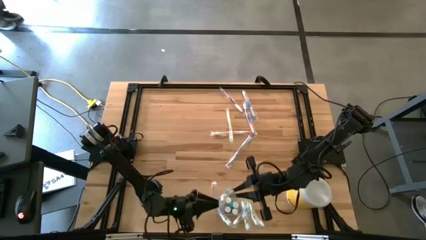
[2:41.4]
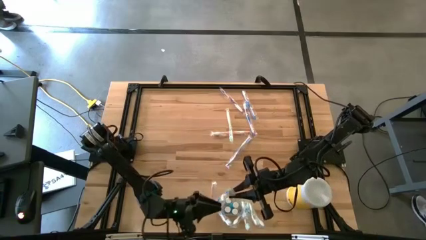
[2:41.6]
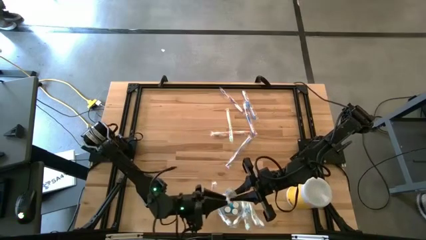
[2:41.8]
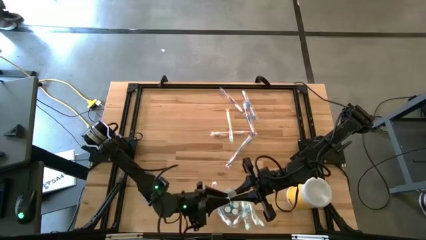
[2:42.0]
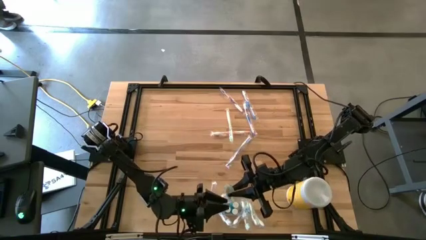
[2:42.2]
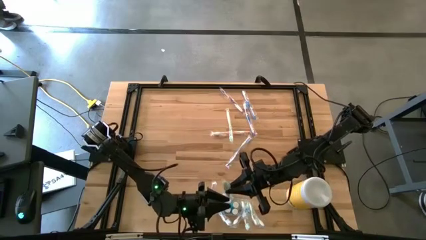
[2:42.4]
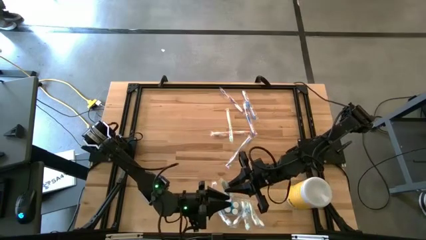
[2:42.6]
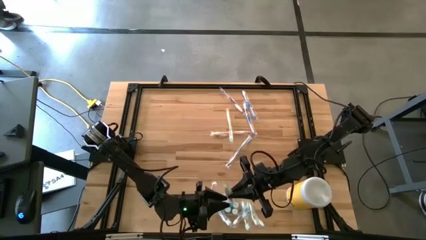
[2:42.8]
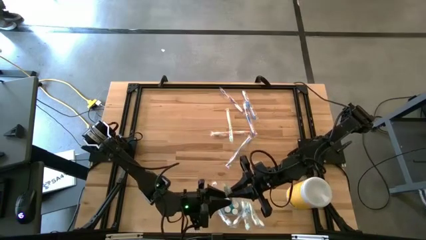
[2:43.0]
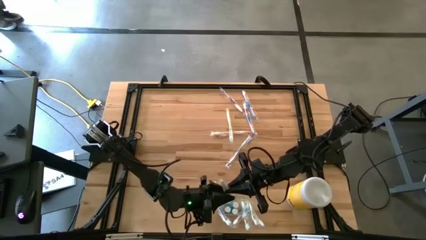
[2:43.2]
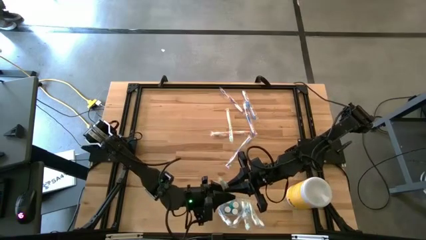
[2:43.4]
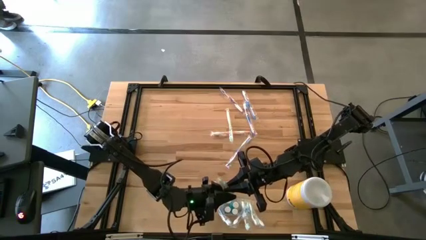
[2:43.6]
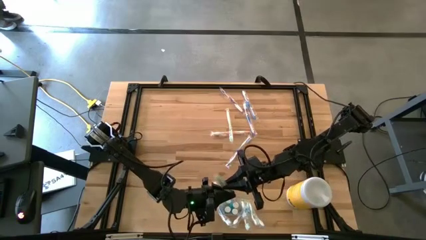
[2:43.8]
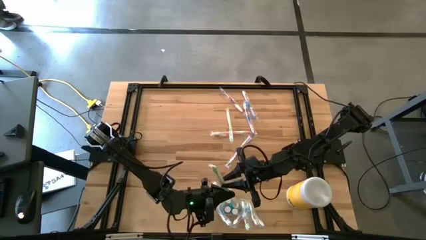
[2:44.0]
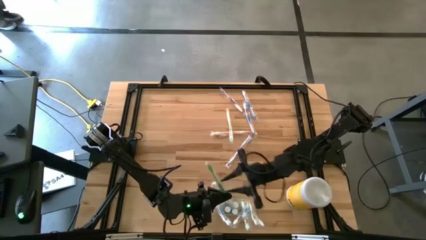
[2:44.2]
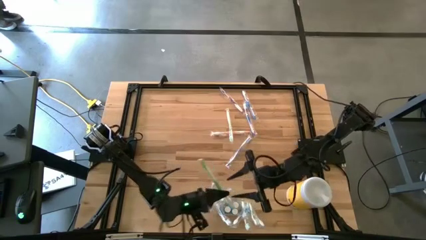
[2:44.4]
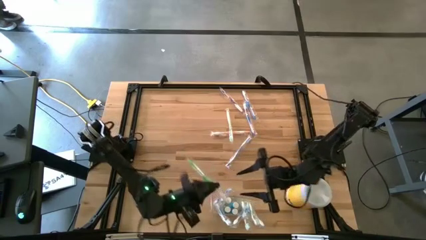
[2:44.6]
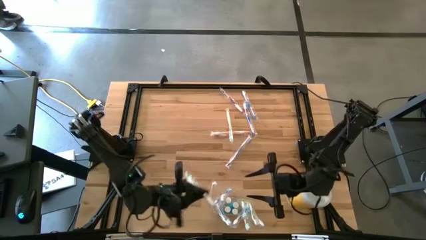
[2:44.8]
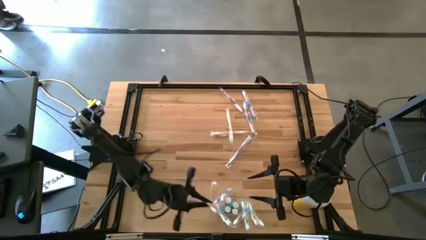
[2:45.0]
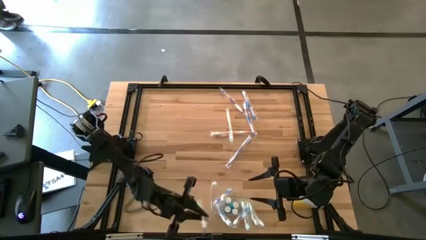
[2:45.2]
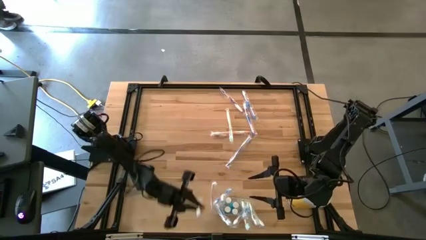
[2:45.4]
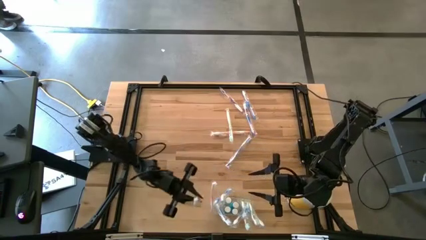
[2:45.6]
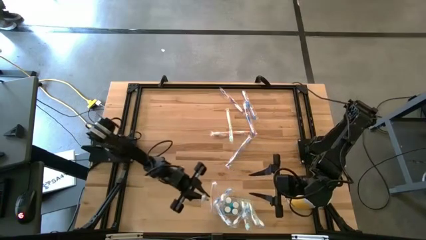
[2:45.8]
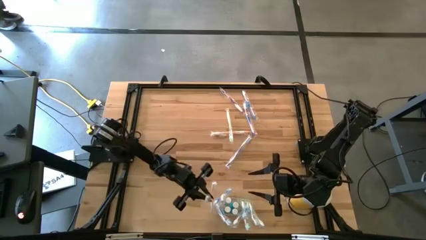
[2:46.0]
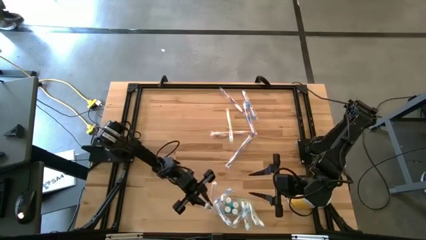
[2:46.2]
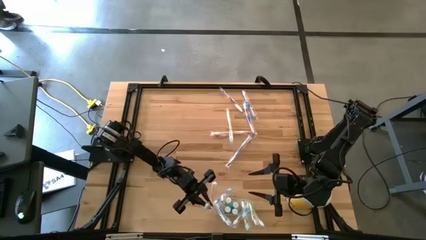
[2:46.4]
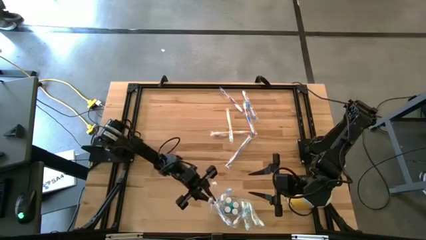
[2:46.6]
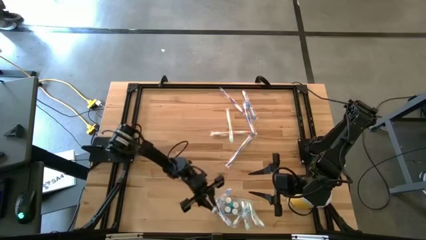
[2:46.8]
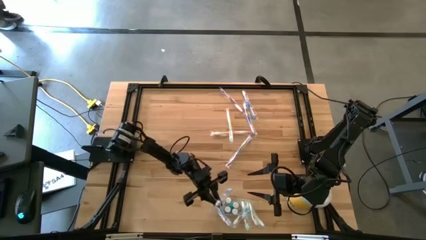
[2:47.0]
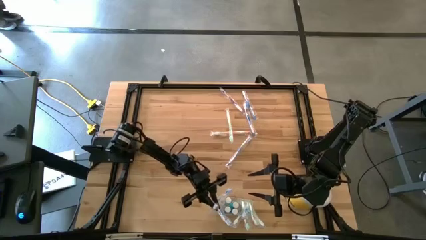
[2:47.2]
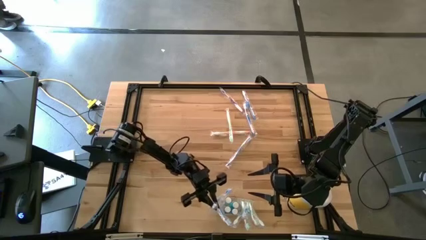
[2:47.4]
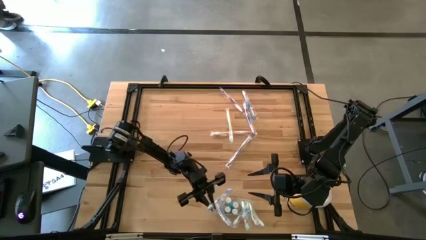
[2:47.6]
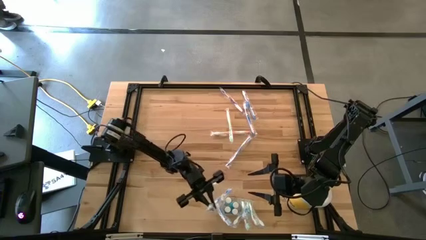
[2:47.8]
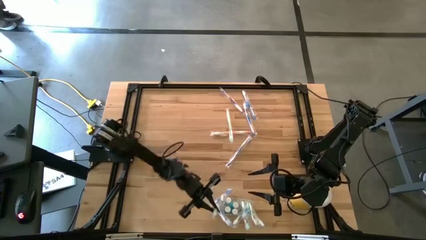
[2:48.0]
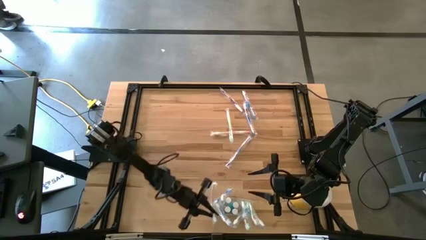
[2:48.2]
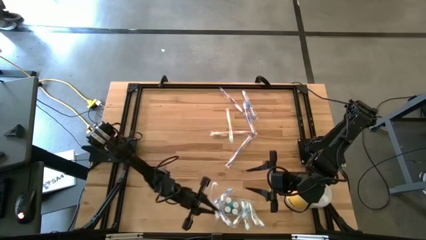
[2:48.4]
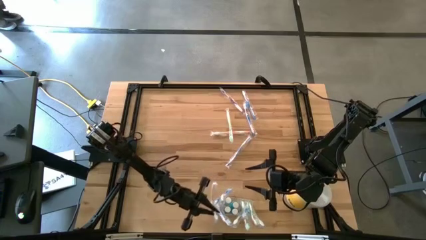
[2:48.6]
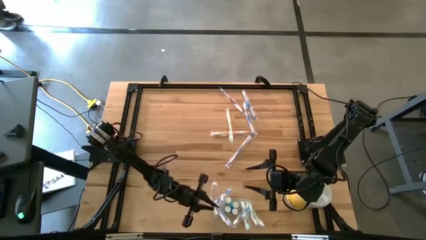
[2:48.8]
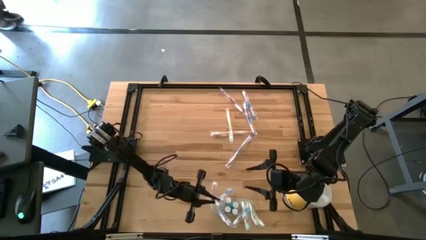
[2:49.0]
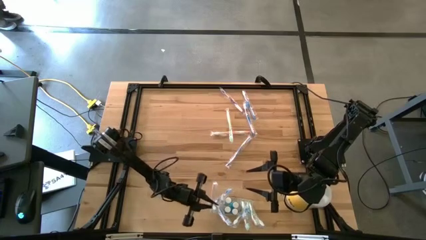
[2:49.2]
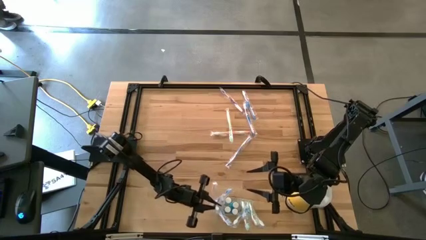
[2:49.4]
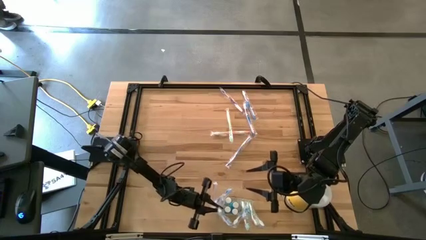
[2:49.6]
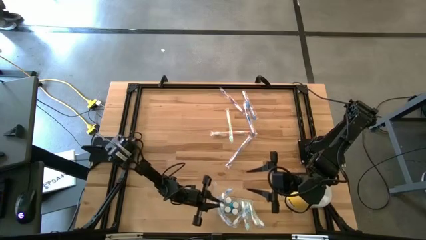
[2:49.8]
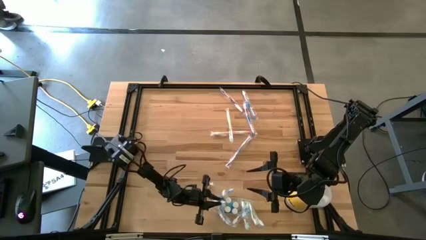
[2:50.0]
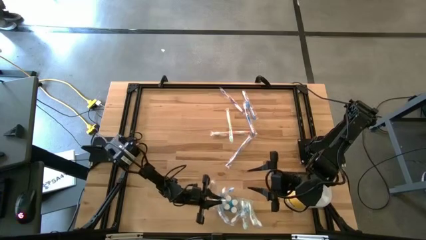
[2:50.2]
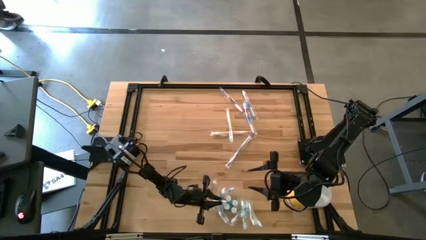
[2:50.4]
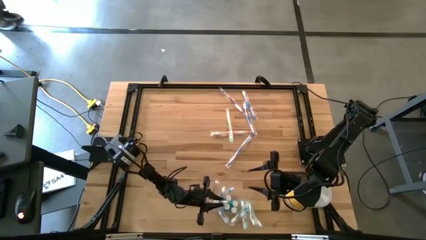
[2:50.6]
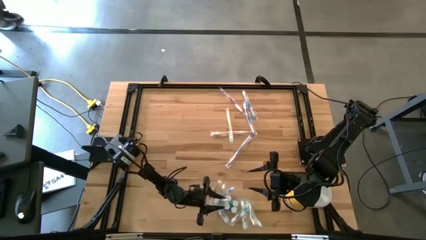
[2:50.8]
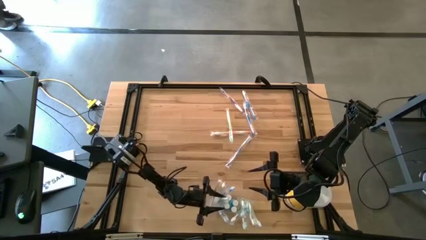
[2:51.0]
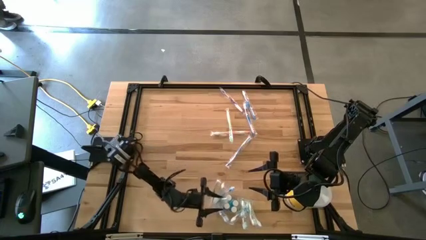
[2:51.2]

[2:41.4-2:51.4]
Task: Pick & Place toothbrushing station
Put the green toothbrush into the transparent organizer

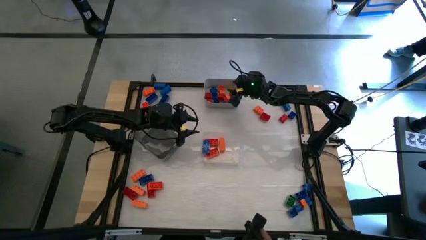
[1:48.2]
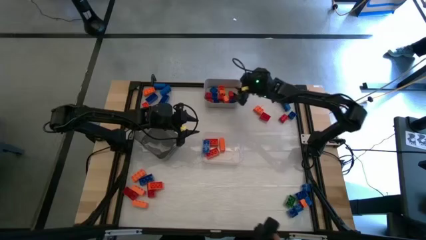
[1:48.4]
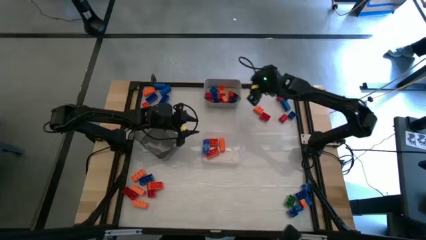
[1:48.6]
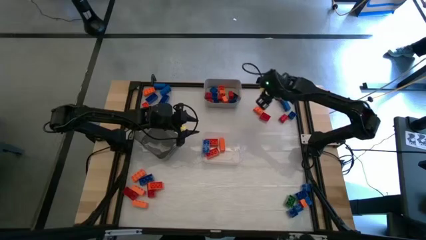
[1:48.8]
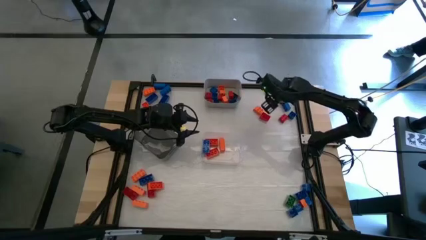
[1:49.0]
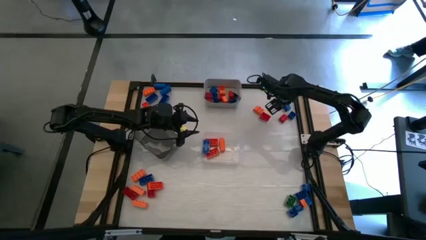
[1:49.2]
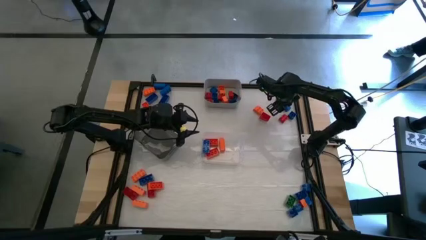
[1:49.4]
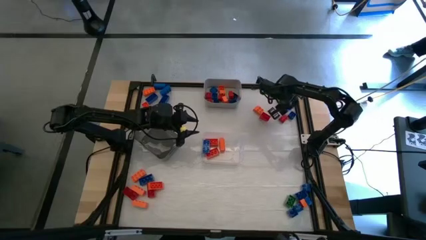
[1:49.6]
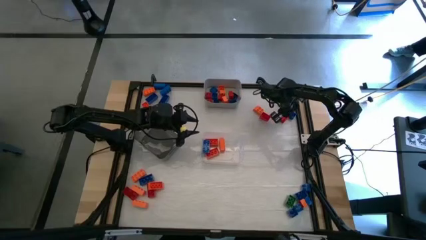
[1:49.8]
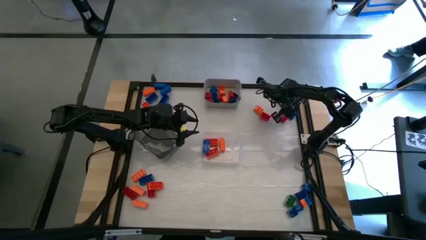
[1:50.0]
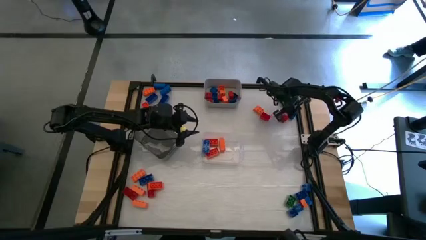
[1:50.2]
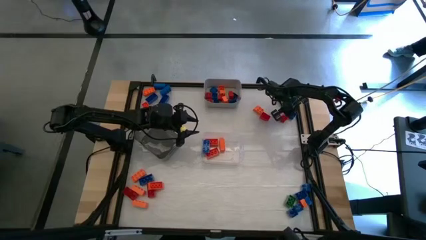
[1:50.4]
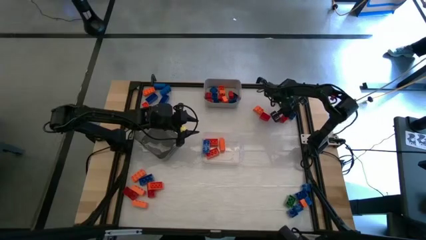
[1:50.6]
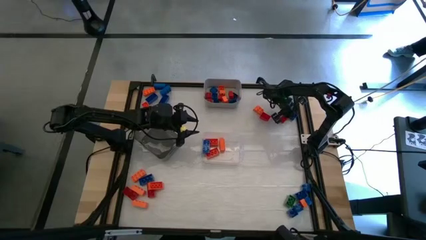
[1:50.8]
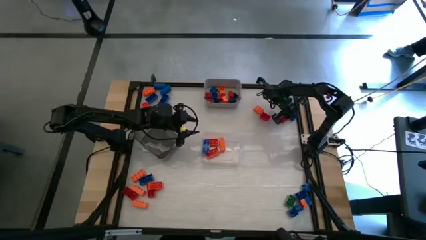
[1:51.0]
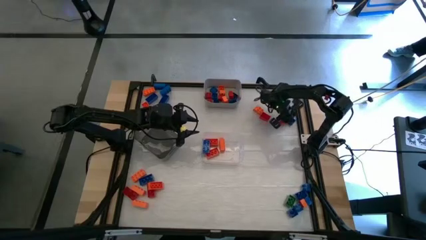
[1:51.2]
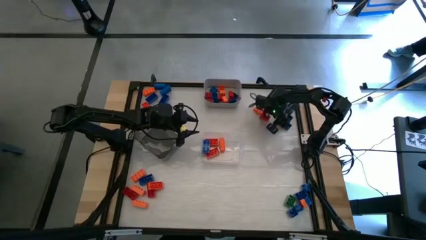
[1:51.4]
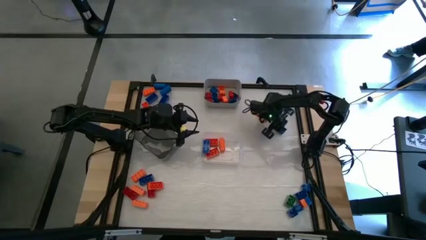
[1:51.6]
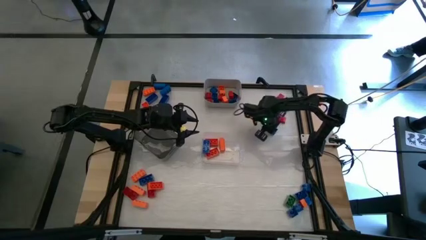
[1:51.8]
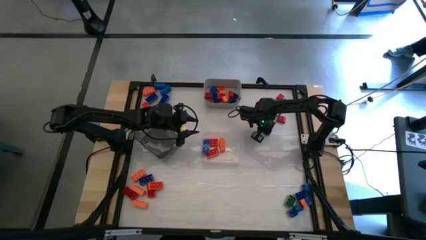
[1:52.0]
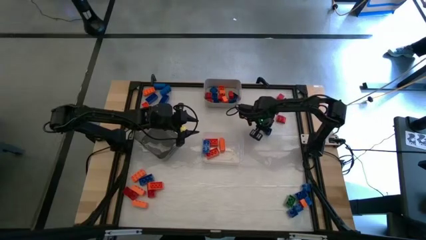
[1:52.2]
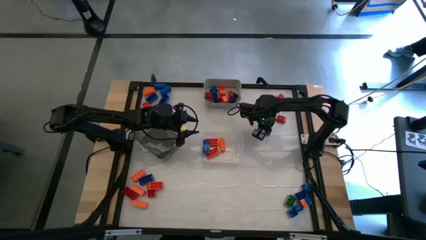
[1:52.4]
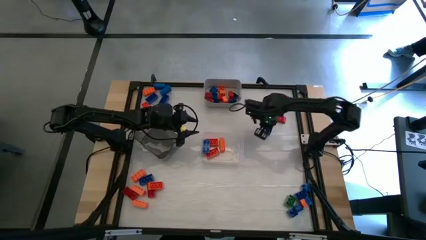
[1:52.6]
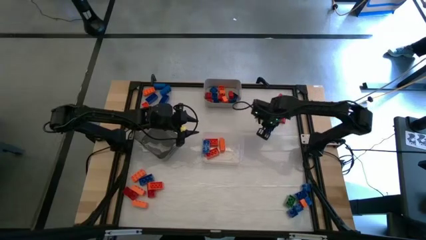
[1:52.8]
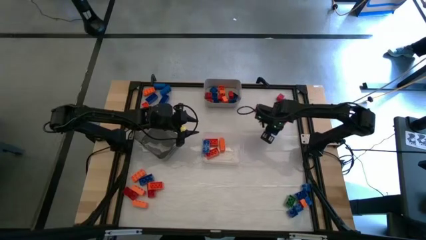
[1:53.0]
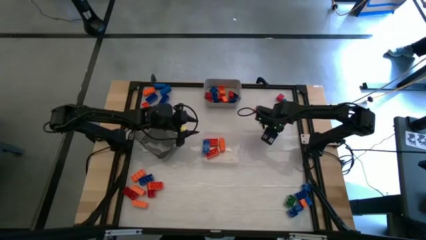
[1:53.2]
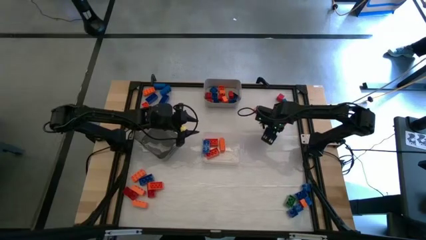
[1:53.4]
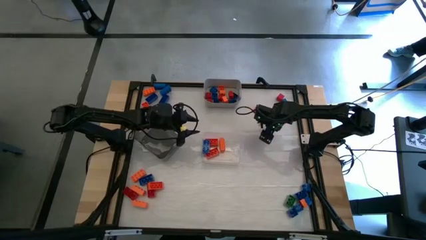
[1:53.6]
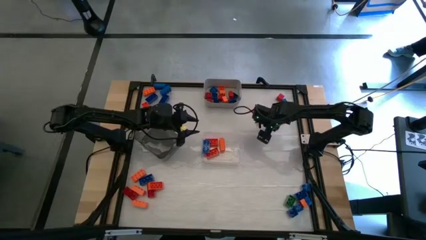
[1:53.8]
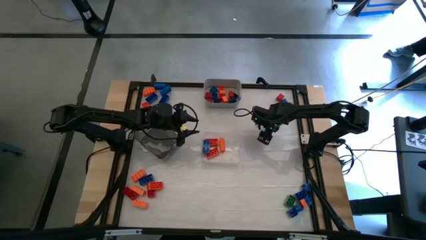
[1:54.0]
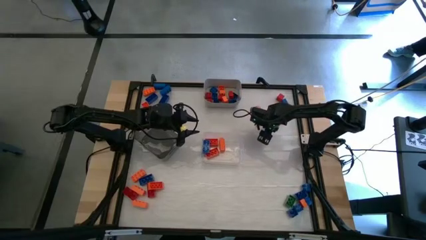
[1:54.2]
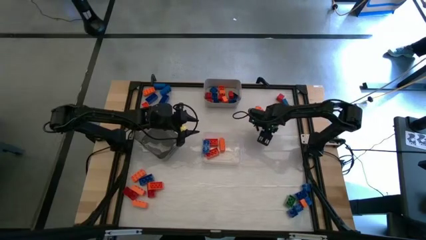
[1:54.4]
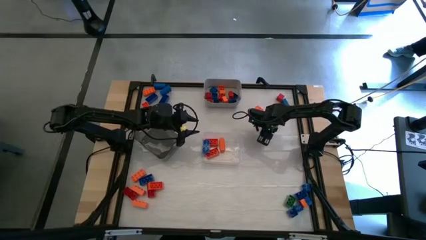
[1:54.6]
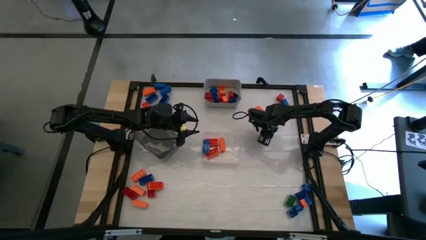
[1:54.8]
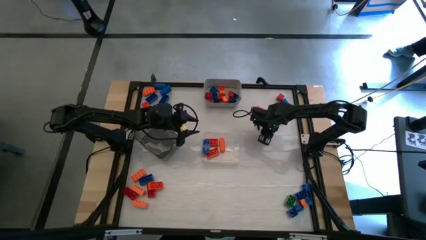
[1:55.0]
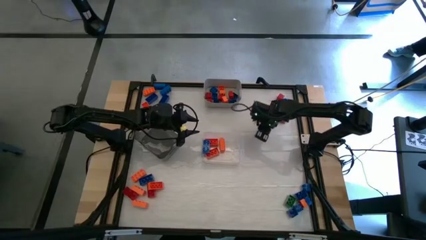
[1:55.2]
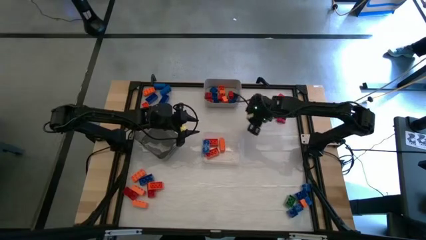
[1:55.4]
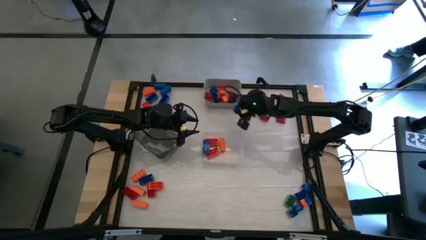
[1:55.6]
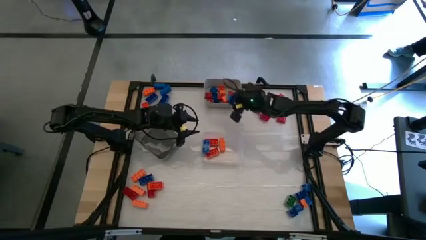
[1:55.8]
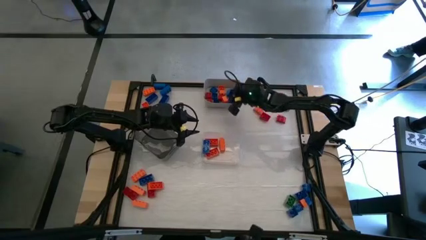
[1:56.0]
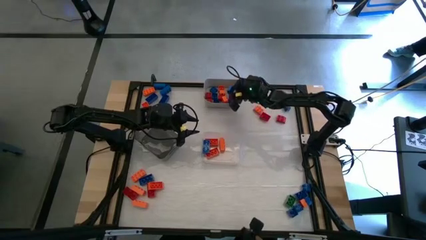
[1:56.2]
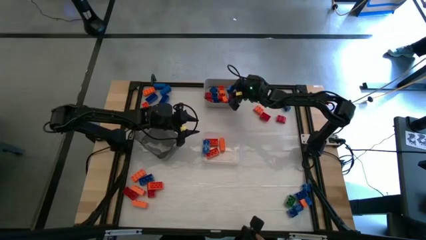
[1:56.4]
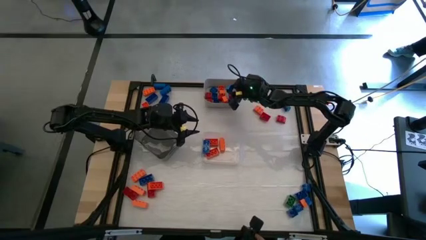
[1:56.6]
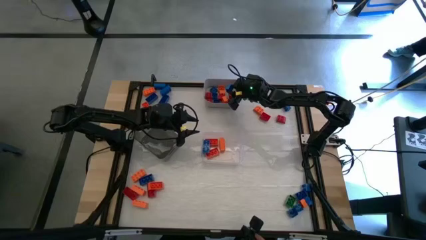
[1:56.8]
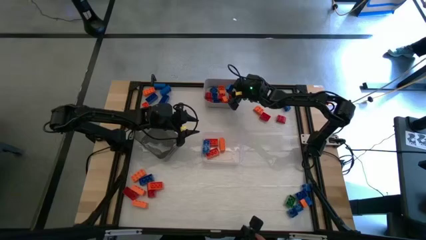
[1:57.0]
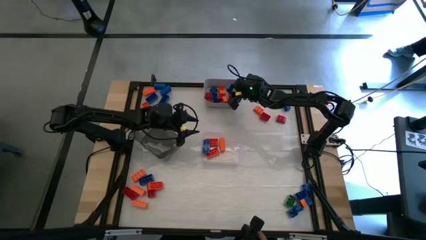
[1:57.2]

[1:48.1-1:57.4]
Task: Sort blocks by size
Put the small blue game piece into the gray bin
